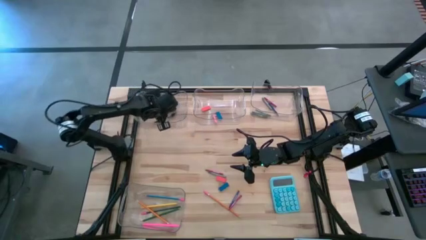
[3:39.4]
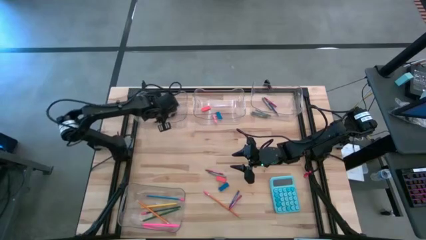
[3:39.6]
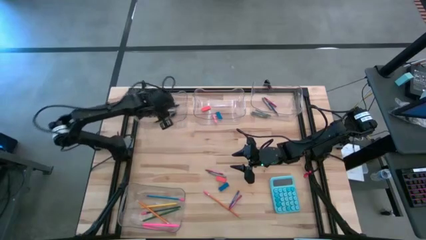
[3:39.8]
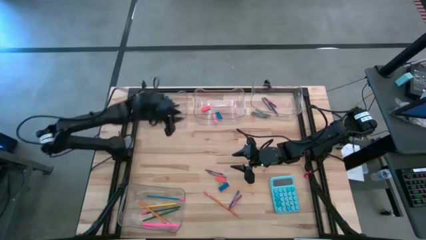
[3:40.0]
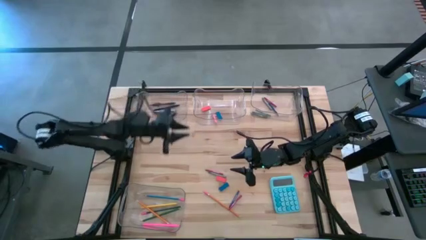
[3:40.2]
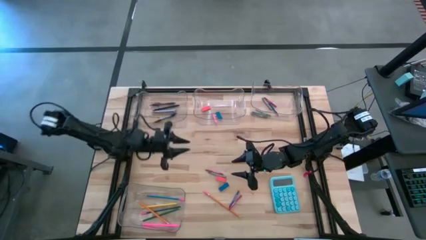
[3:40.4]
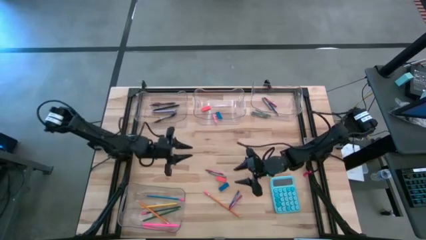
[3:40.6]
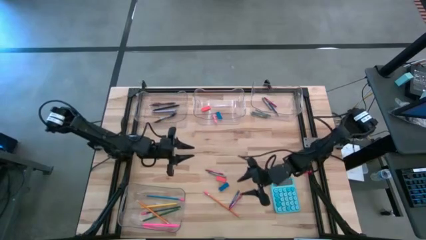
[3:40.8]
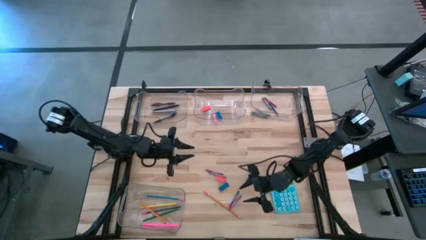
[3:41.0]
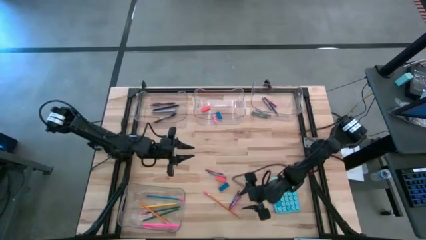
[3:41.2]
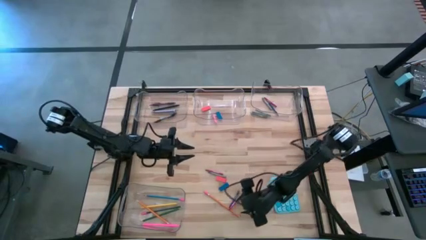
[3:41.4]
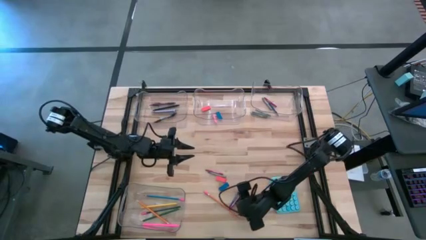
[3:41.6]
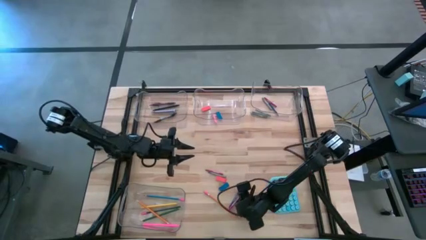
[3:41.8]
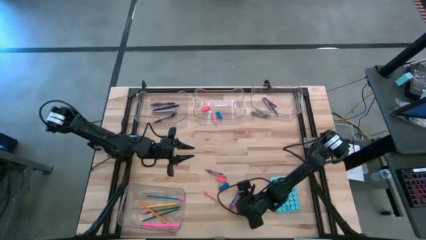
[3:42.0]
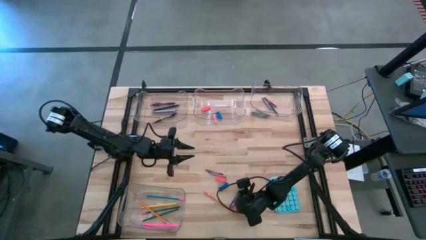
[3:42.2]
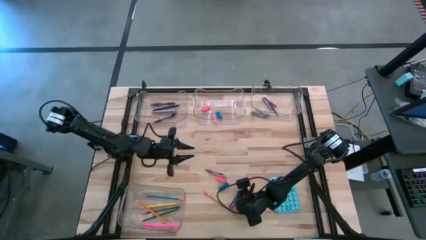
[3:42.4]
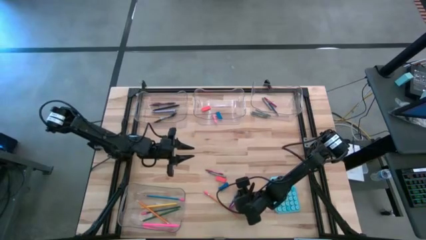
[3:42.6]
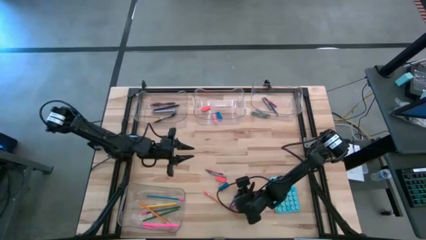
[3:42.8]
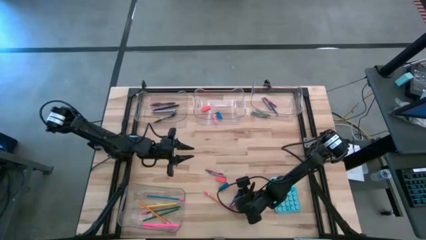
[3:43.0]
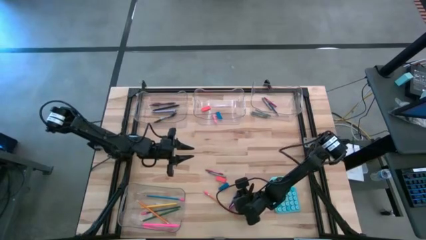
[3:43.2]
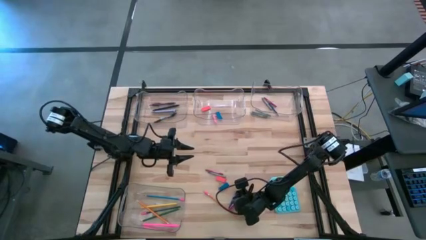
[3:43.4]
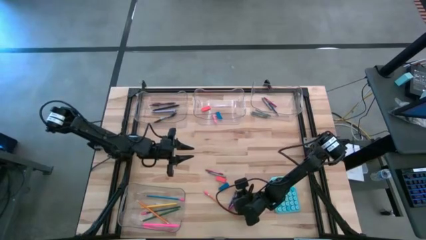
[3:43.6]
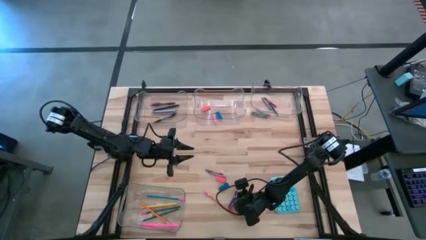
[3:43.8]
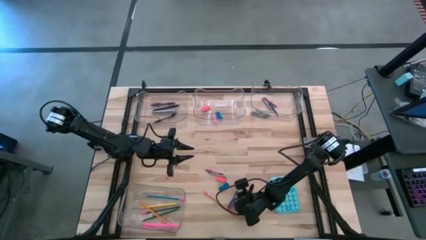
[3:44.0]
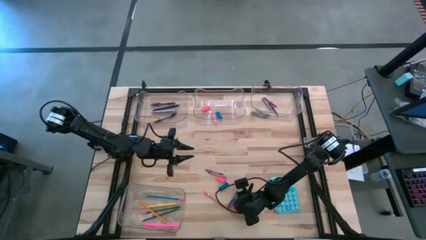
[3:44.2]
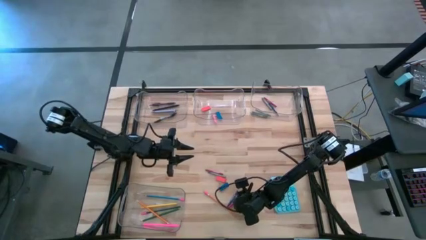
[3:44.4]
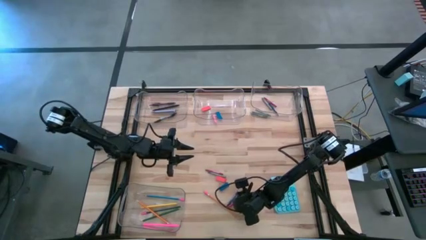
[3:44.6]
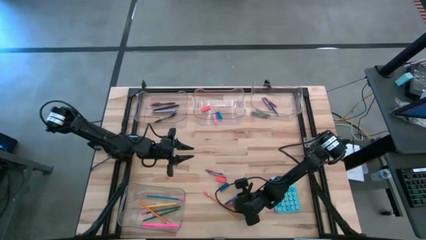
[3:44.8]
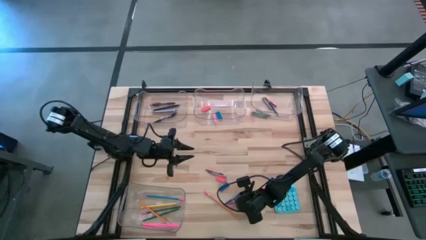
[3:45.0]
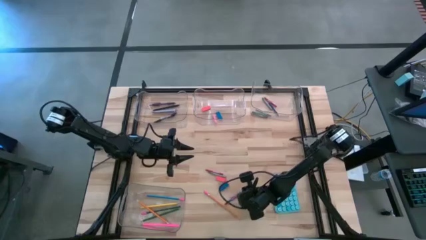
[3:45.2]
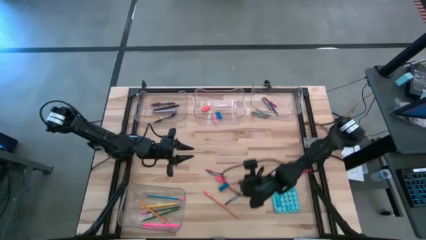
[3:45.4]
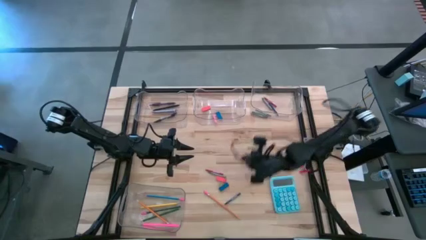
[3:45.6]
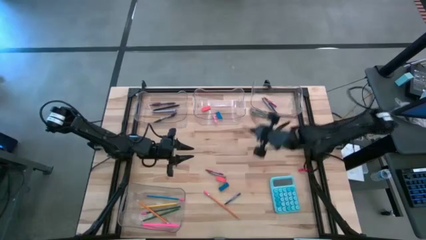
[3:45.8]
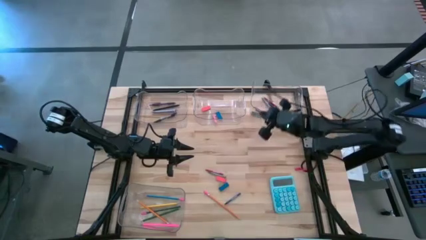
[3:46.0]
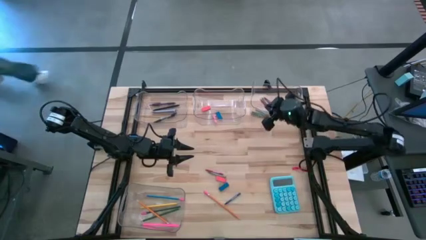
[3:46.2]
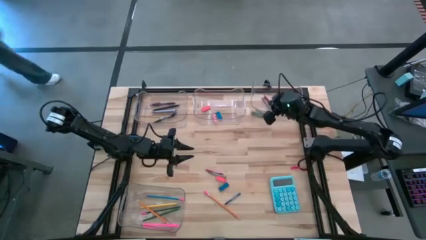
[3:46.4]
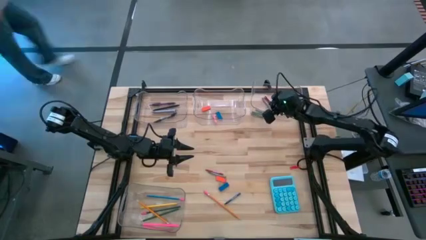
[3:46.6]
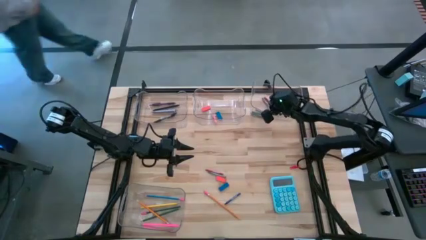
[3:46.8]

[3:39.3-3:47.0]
Task: Sort crayons/erasers/pens/pencils in bins
Put the red crayon into the top right transparent bin

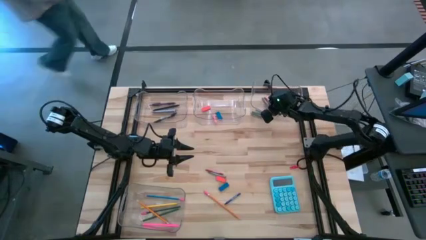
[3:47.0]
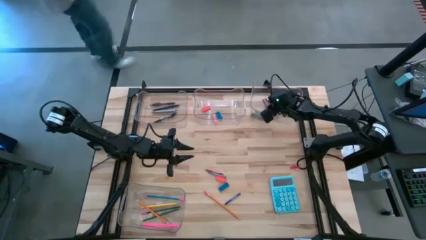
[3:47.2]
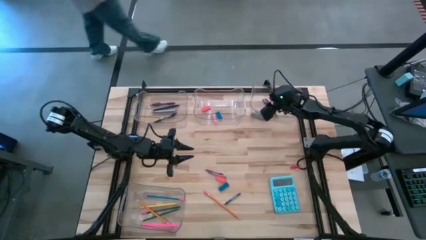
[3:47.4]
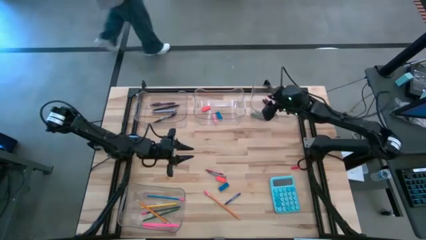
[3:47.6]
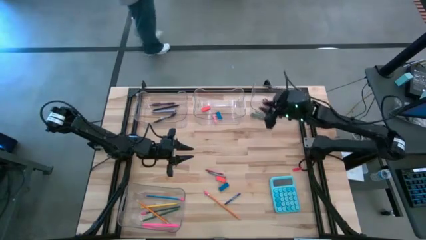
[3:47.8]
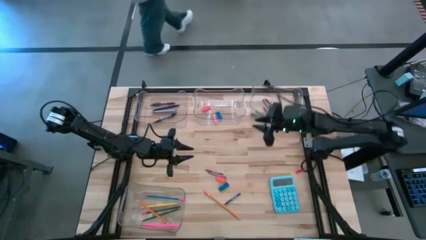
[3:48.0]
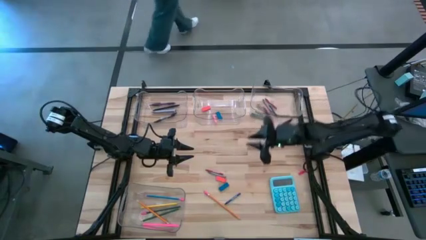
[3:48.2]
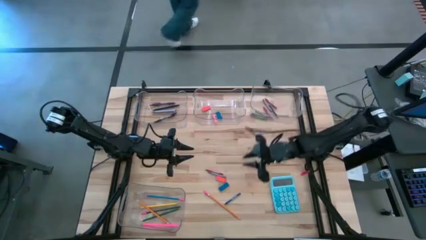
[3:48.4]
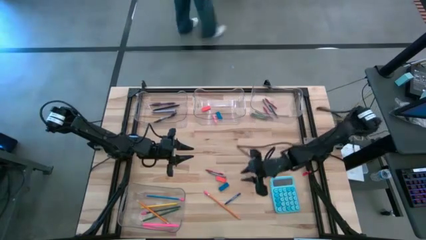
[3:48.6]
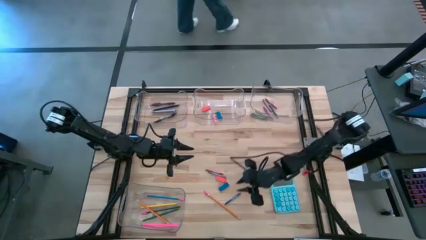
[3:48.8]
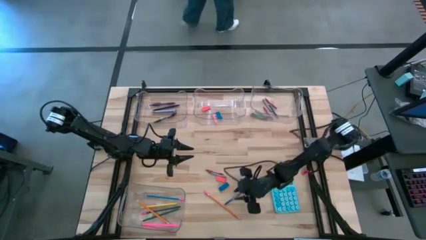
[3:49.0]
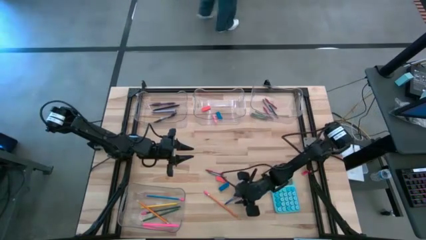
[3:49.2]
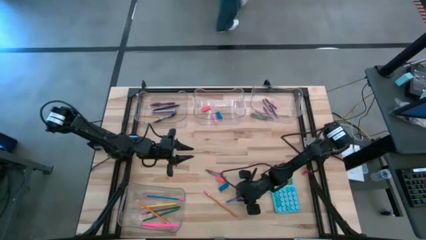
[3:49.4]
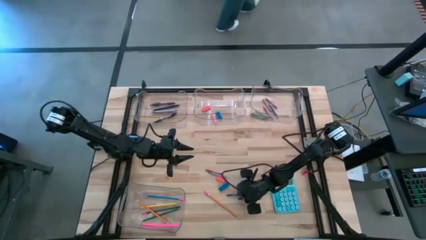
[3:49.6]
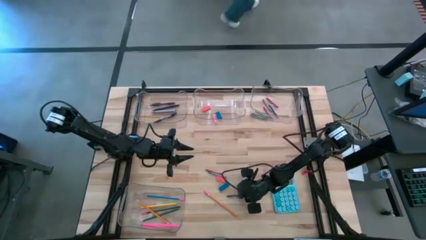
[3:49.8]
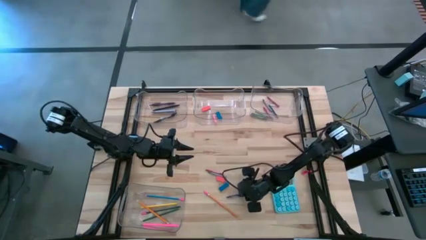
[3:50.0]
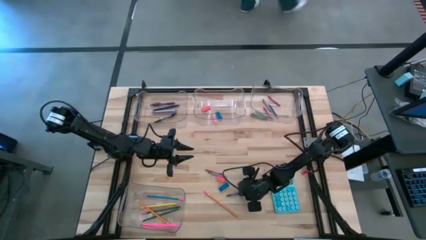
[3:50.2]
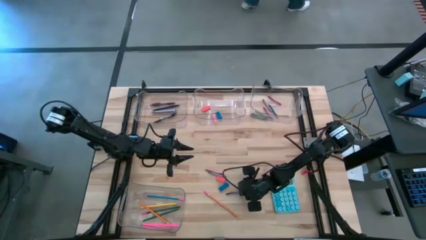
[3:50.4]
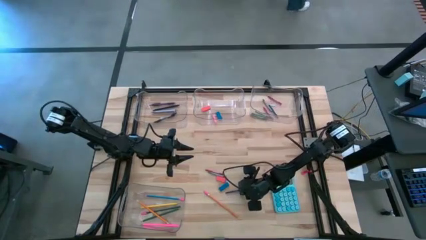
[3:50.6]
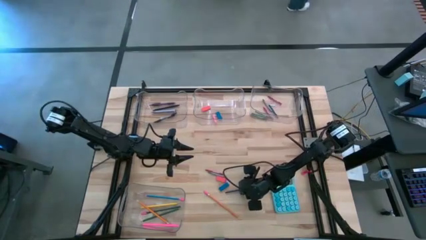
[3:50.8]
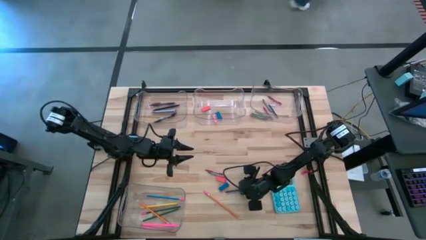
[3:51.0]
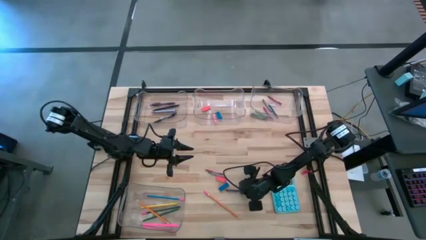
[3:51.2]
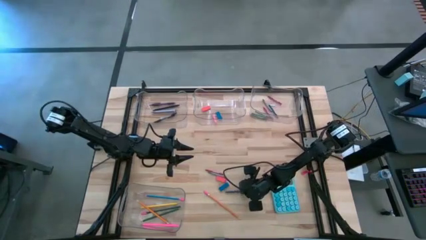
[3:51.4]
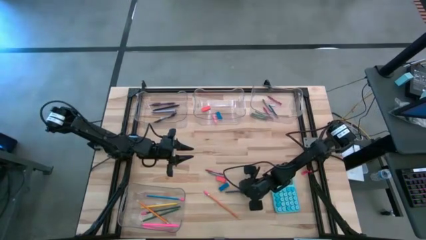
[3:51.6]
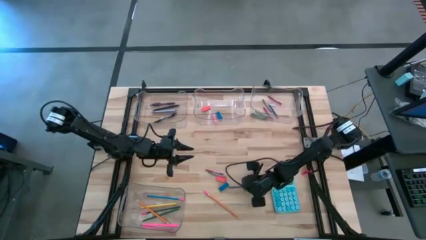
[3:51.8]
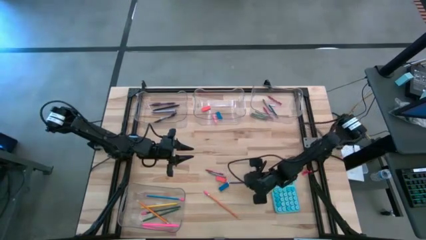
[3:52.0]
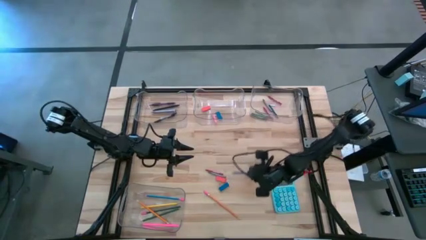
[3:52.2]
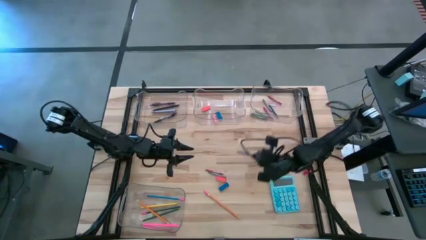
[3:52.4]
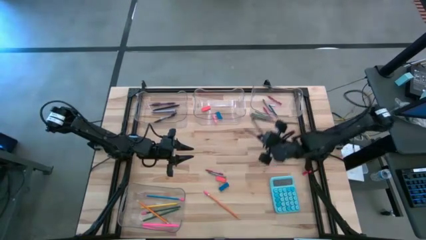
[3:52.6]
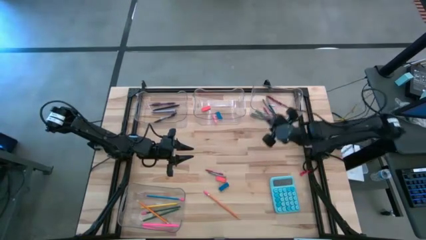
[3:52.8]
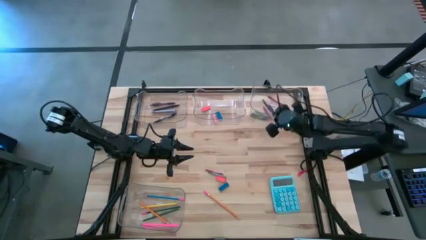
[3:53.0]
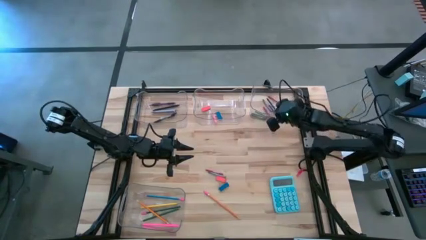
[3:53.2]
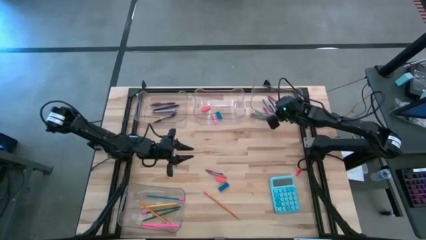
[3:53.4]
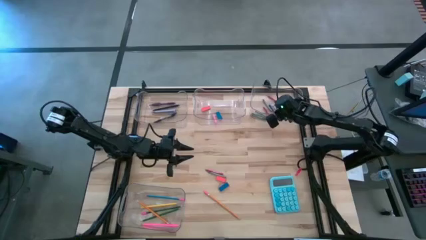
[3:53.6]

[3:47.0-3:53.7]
Put the blue crayon into the top right transparent bin

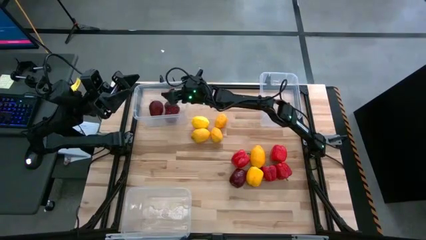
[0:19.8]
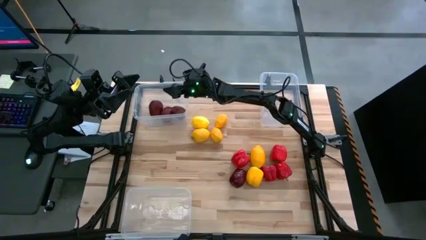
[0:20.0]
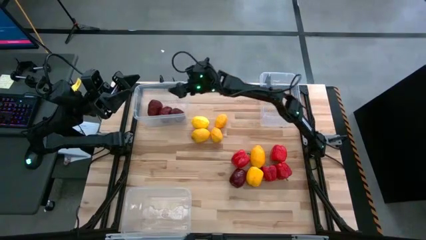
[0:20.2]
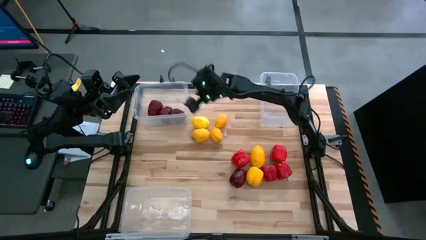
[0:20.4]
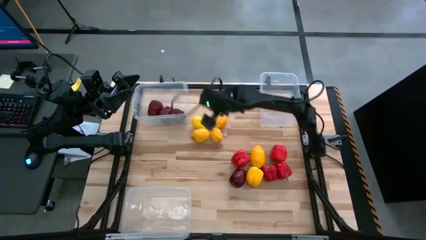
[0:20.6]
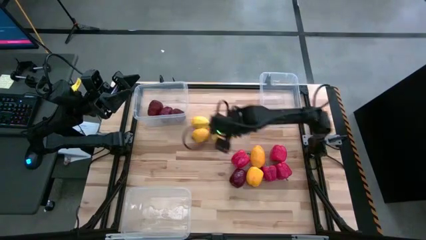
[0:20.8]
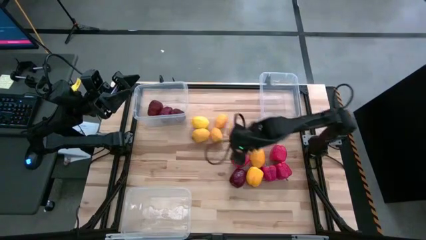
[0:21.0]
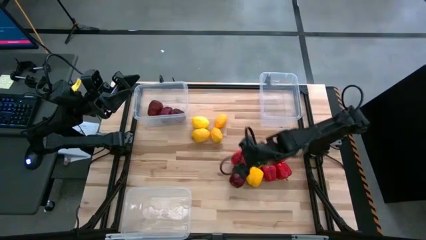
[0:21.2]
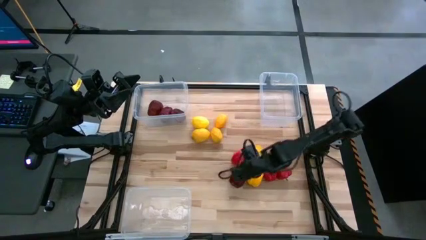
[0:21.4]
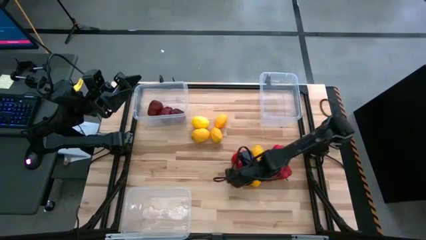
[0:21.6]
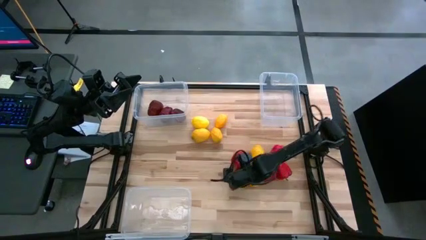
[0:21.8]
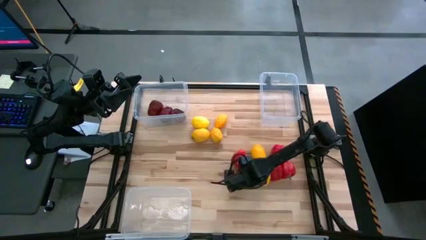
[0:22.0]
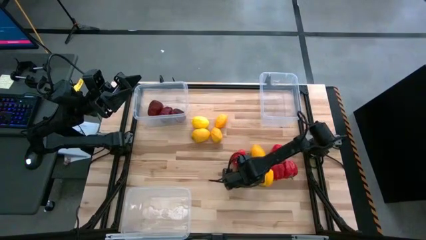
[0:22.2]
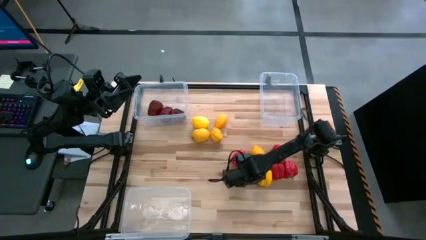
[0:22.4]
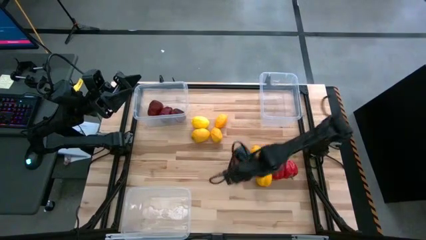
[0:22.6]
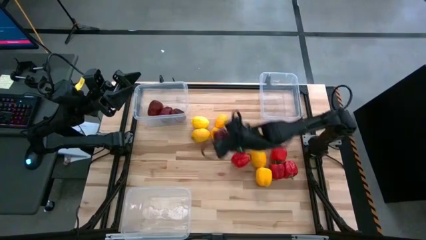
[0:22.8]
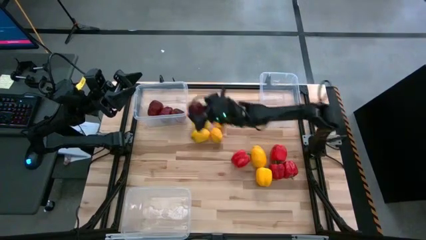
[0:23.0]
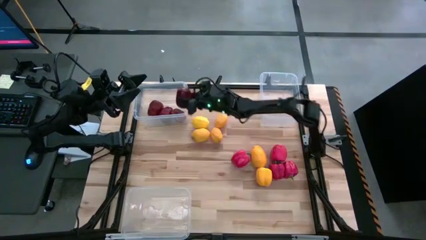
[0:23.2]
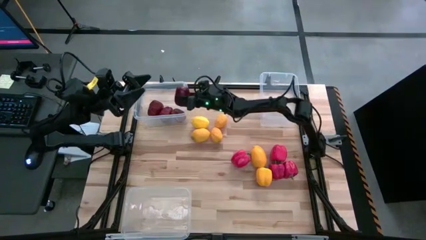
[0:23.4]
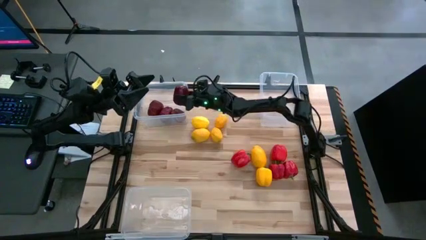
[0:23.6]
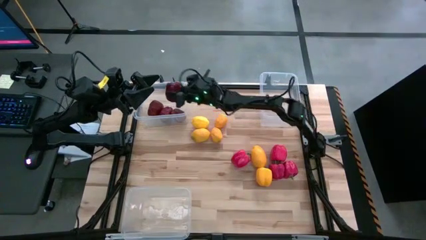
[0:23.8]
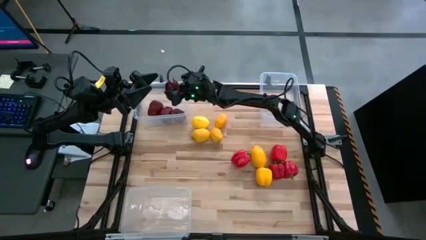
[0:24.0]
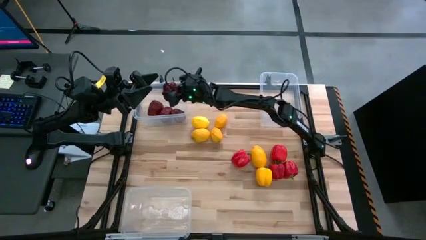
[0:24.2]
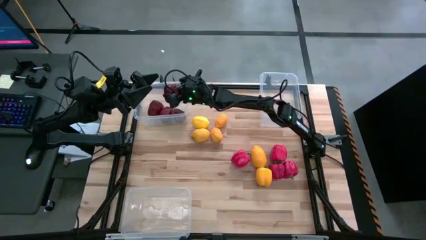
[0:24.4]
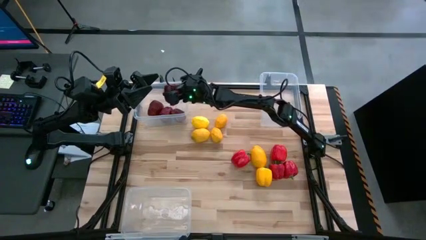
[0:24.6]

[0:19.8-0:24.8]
Task: Sort produce into baskets
Put the red apple into the top-left transparent bin
